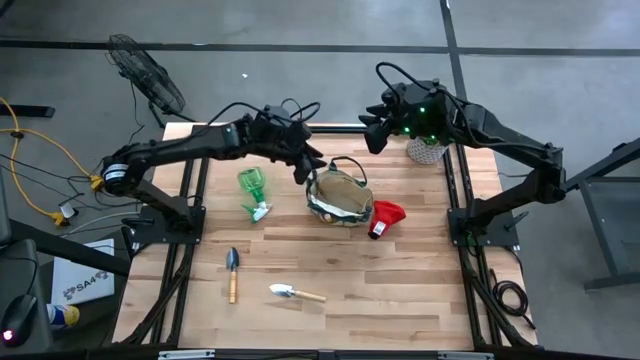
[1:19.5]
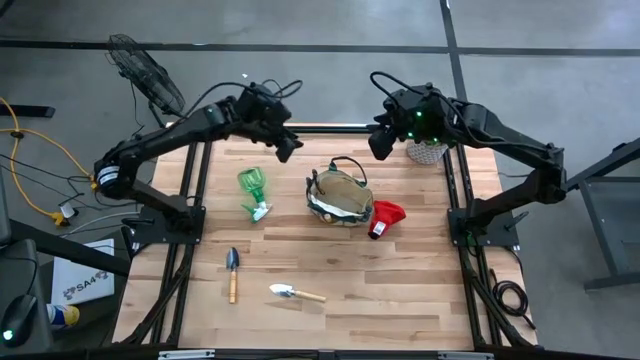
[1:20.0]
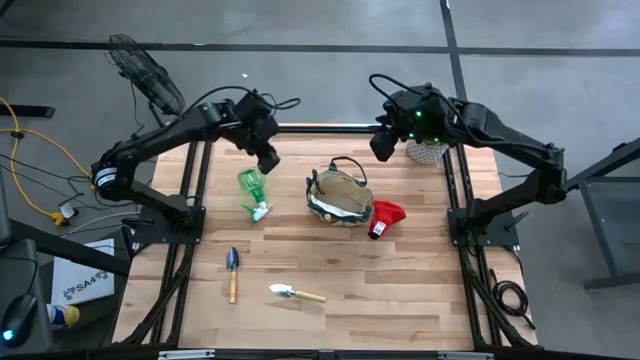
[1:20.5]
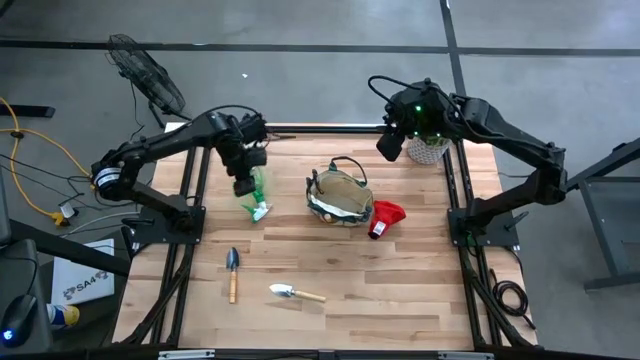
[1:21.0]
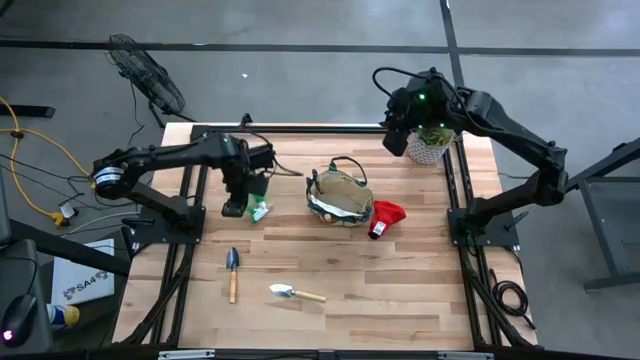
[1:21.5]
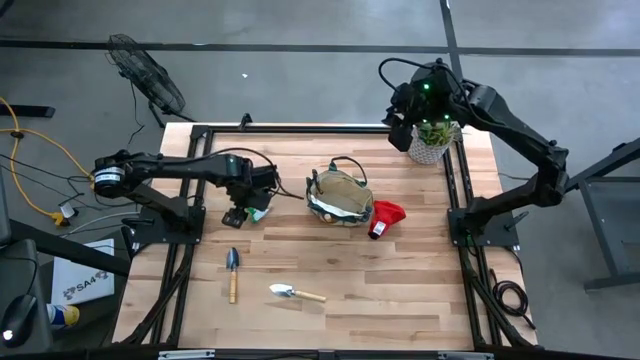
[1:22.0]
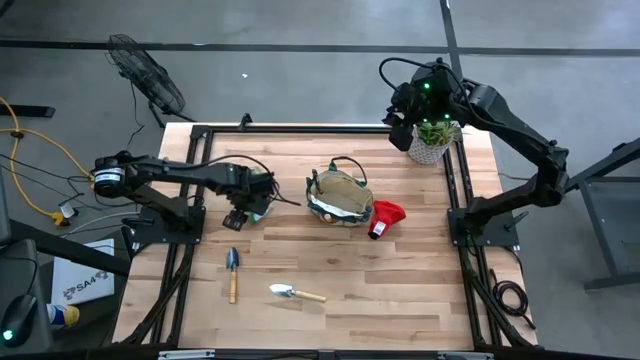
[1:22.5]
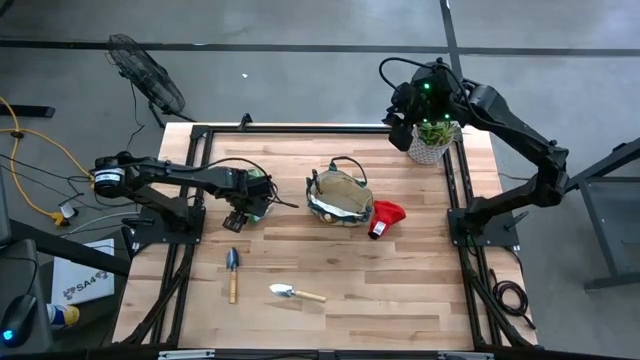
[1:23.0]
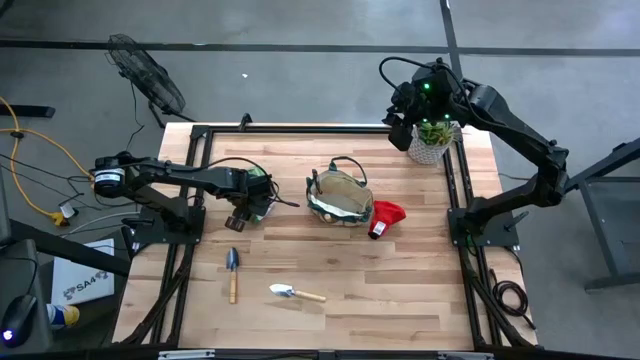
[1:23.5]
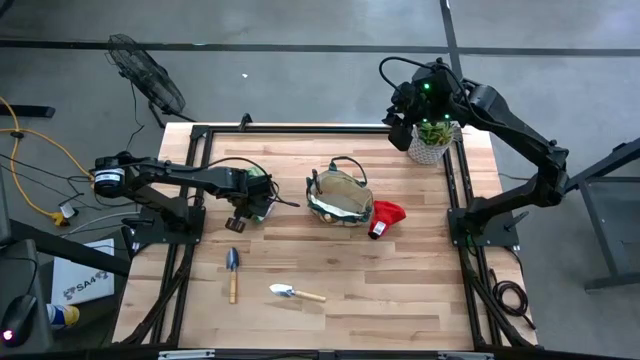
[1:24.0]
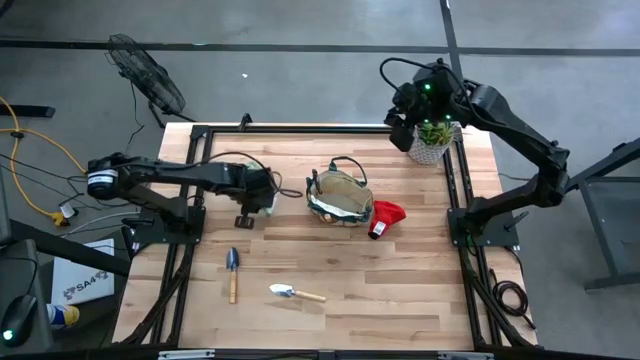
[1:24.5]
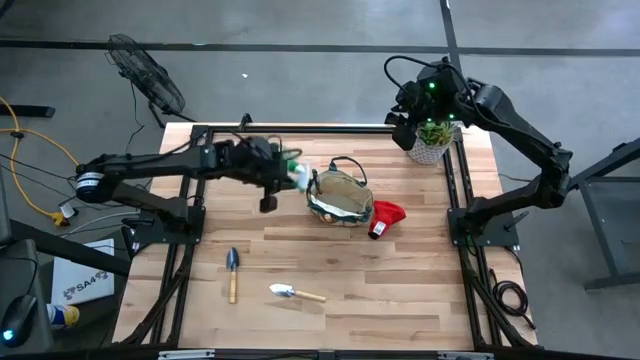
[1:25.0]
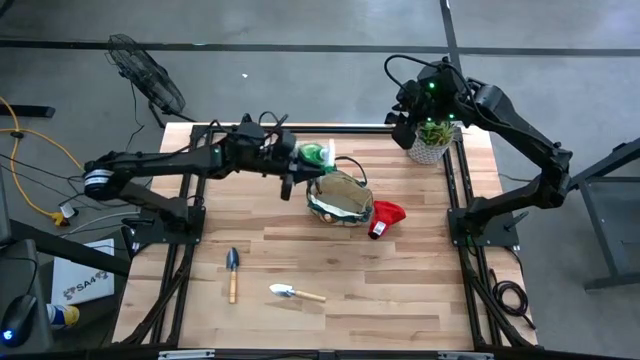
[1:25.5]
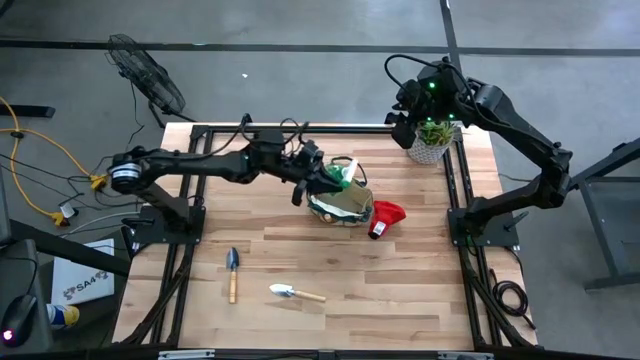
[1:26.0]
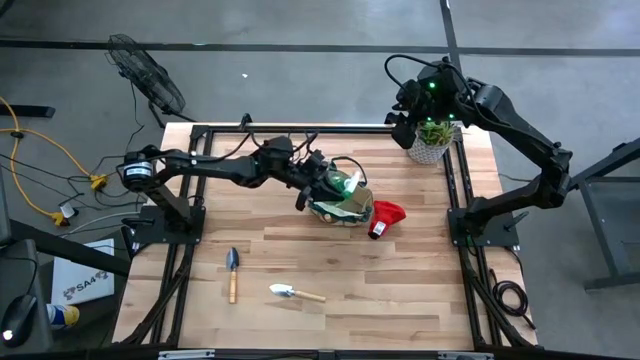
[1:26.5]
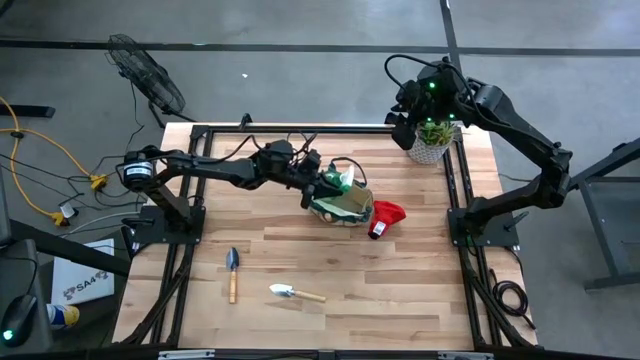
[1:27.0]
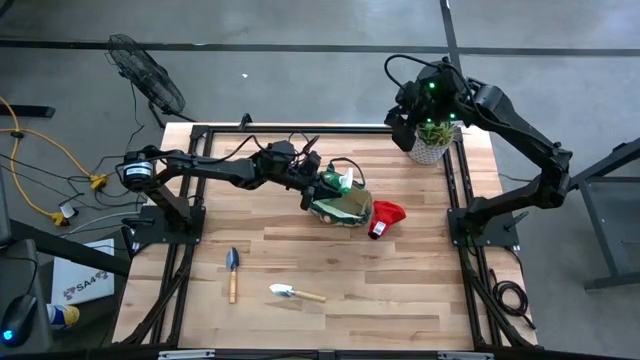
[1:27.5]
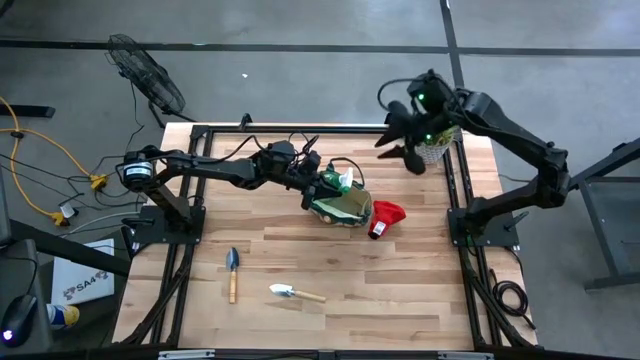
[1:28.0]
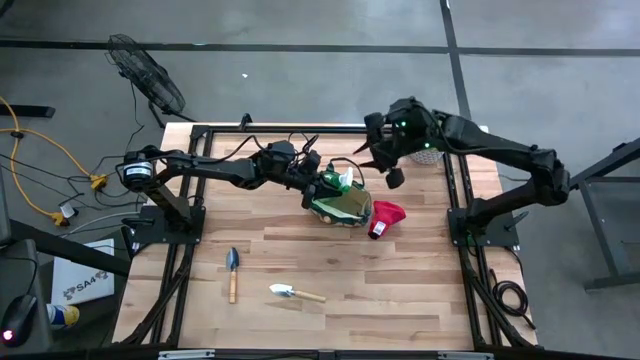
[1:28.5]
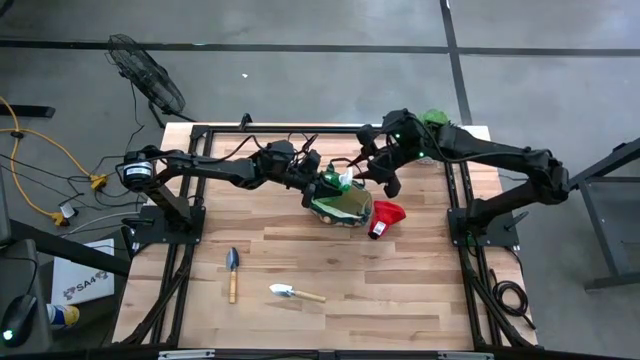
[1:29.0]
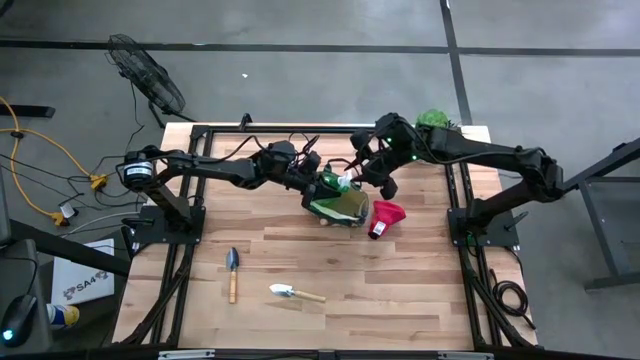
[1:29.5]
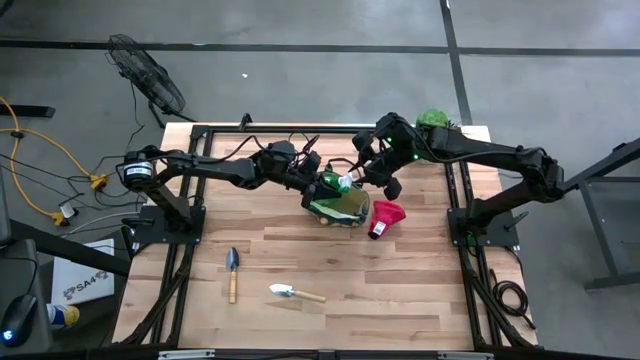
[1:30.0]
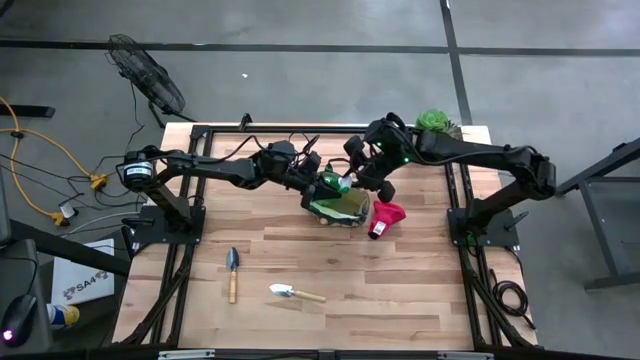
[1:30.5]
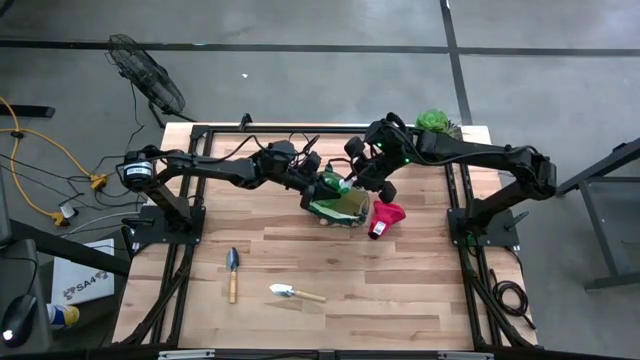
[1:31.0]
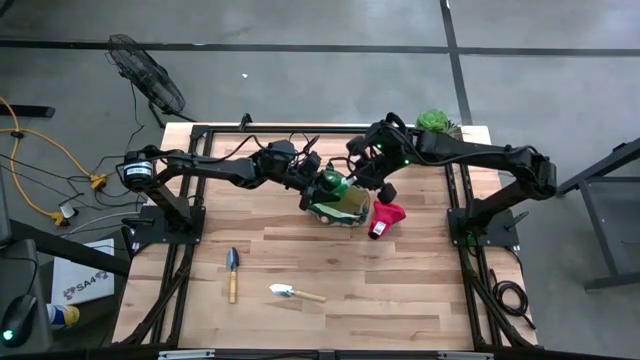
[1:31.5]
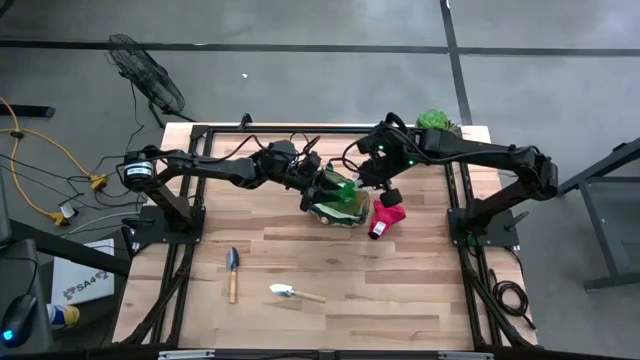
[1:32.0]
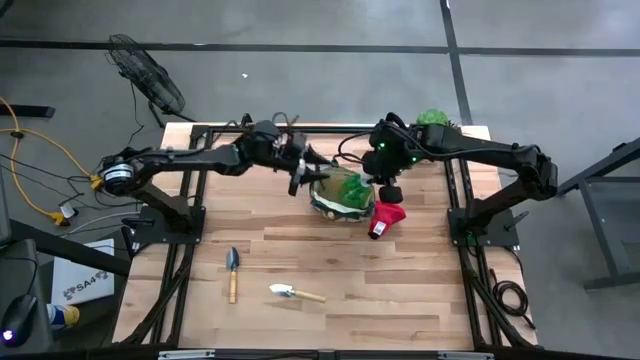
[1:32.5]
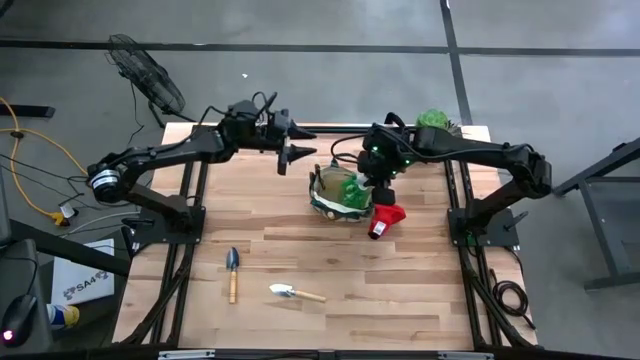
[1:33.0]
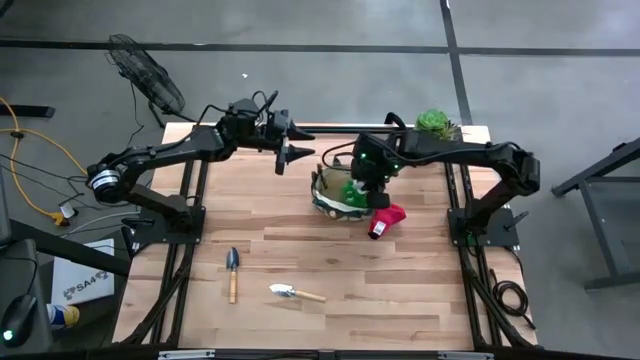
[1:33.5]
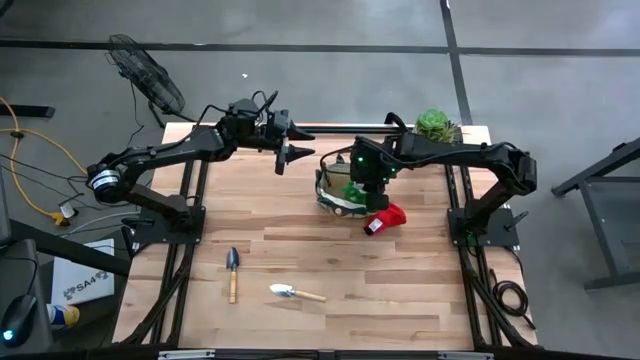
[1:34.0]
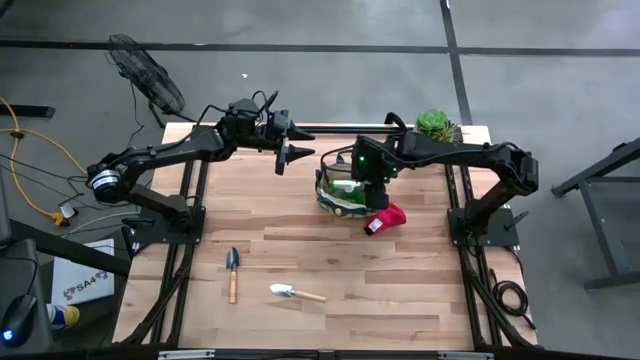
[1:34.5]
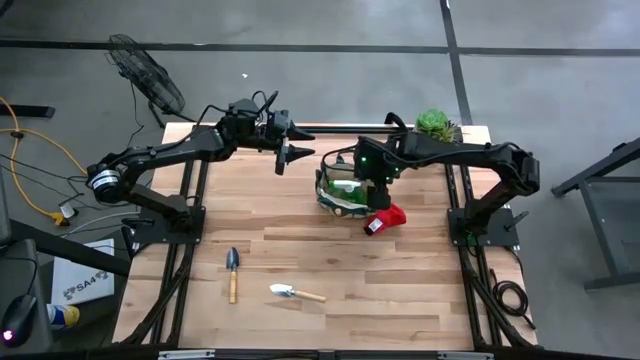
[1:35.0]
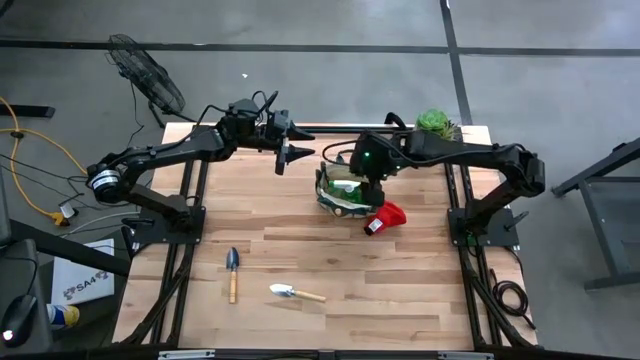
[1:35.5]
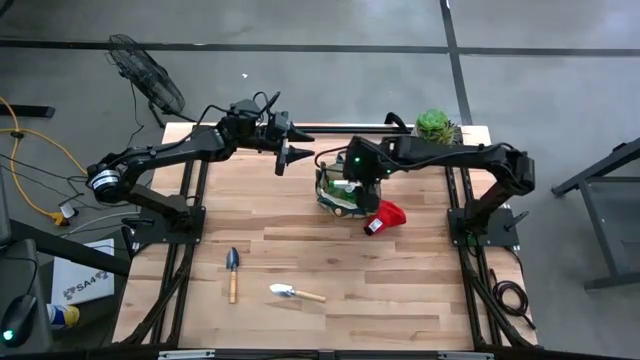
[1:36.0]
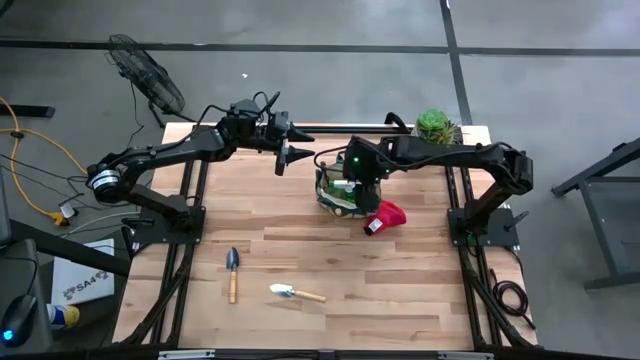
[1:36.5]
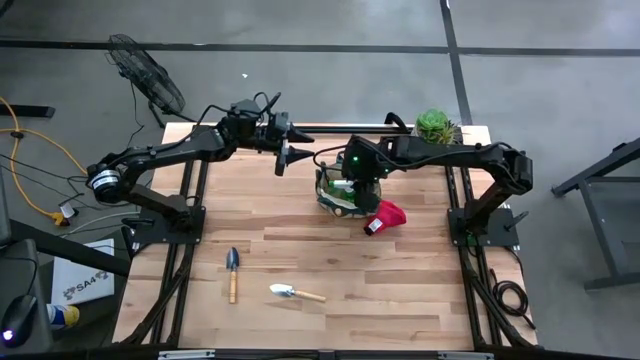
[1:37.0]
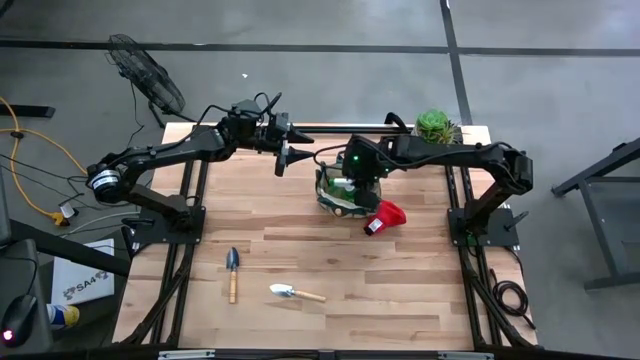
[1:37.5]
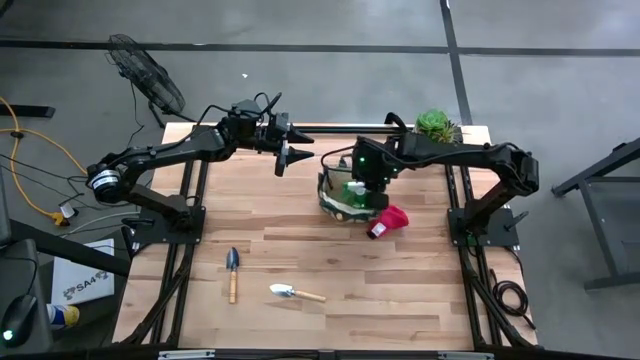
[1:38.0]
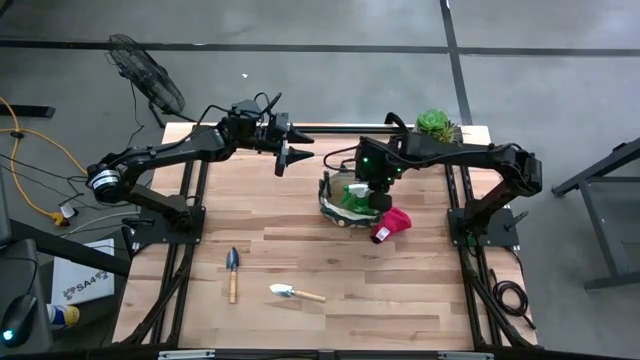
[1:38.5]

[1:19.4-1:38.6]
Task: Pick & Place Garden tools in Gardening bag
Put the green spray bottle into the gardening bag
